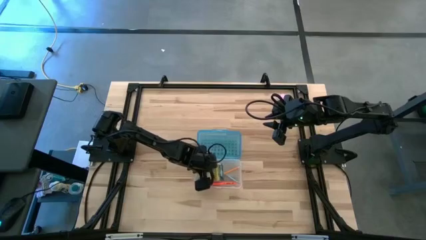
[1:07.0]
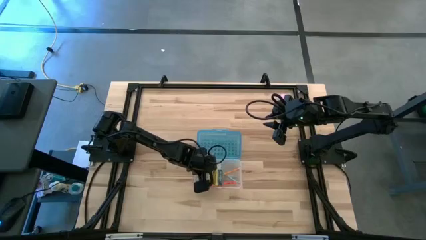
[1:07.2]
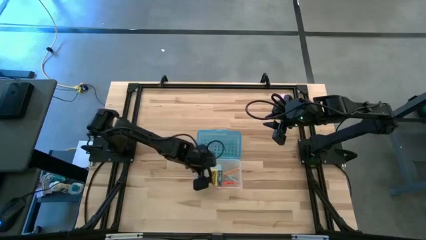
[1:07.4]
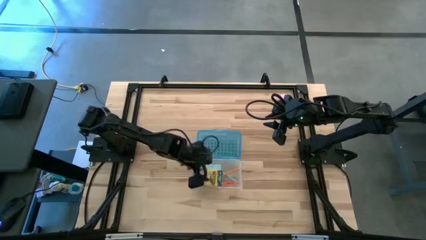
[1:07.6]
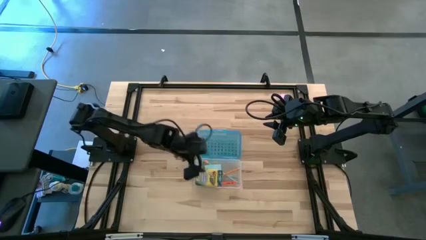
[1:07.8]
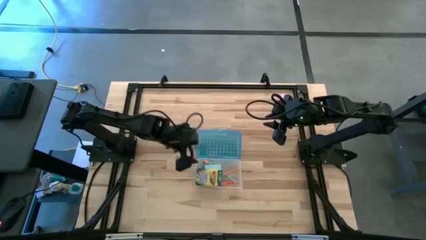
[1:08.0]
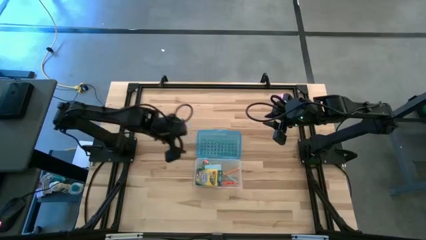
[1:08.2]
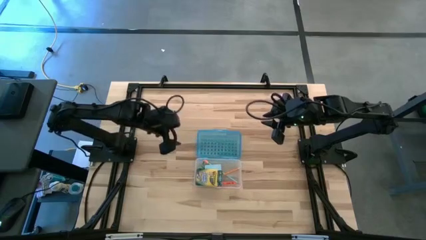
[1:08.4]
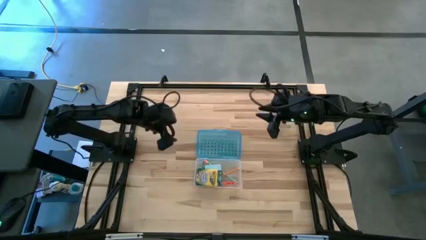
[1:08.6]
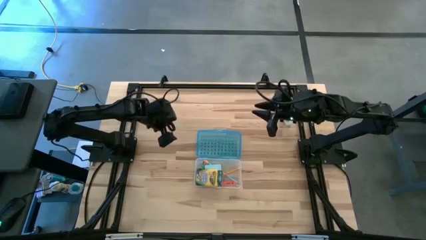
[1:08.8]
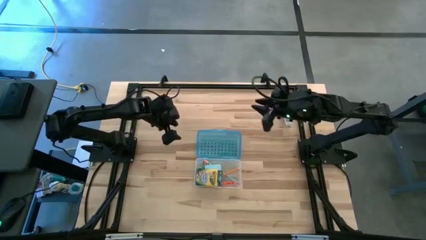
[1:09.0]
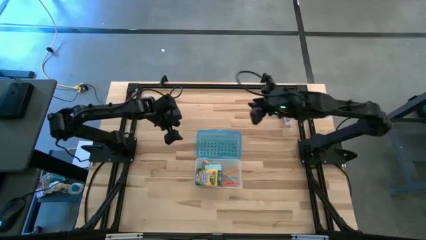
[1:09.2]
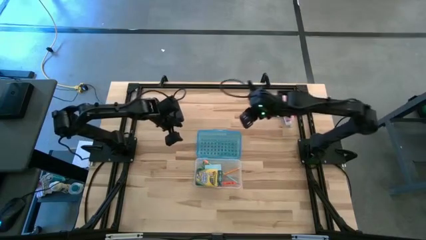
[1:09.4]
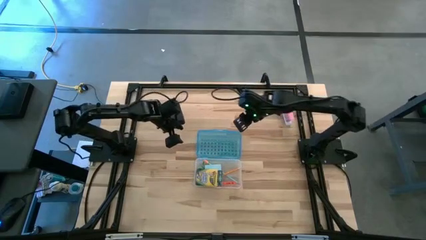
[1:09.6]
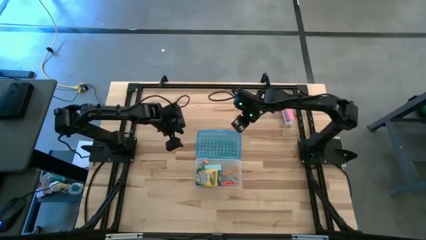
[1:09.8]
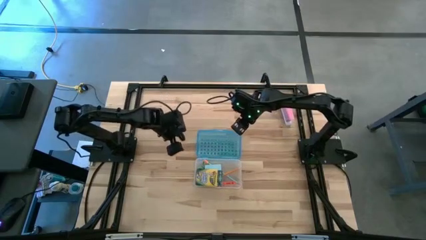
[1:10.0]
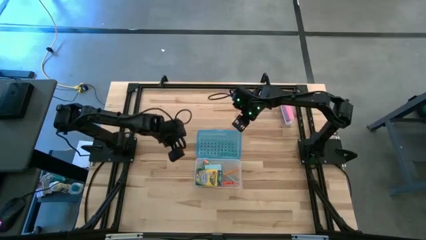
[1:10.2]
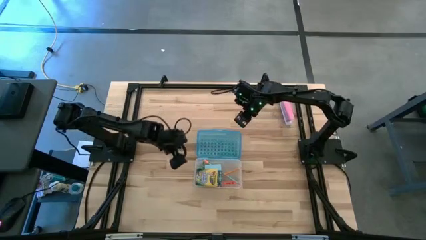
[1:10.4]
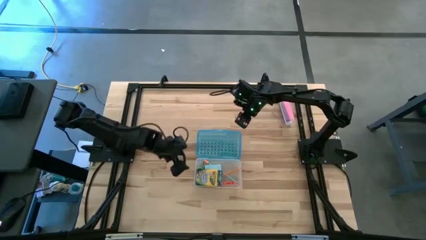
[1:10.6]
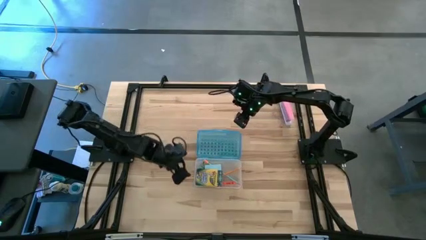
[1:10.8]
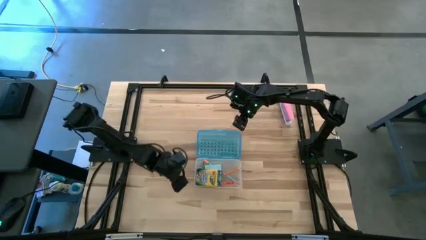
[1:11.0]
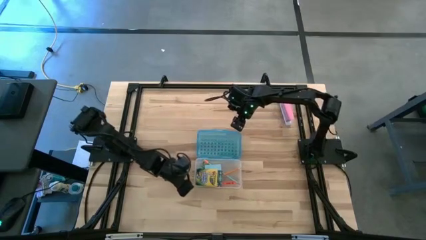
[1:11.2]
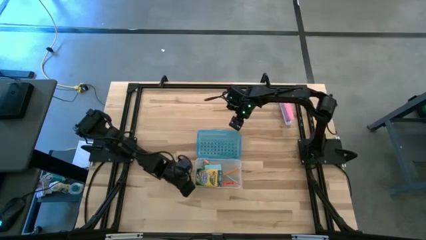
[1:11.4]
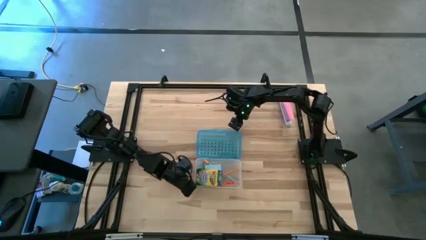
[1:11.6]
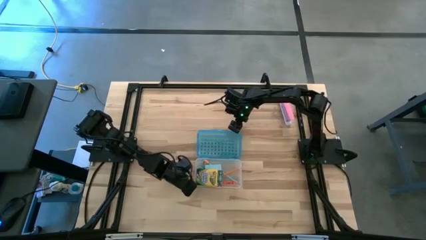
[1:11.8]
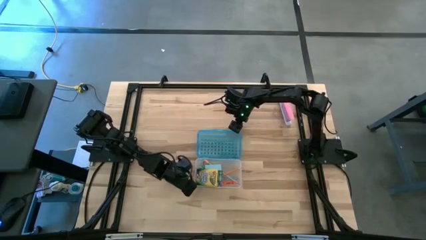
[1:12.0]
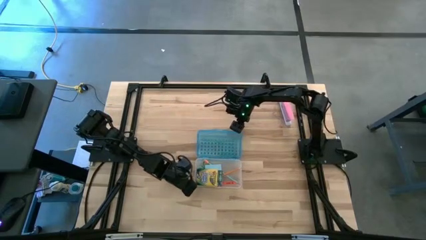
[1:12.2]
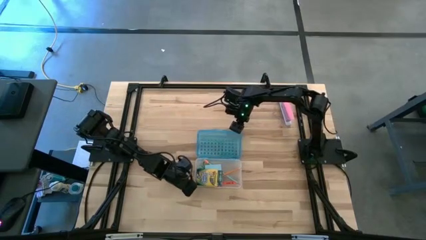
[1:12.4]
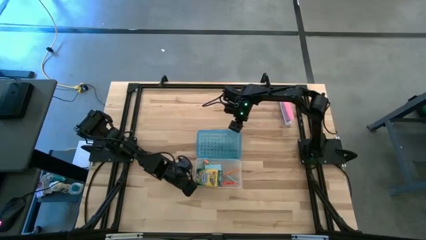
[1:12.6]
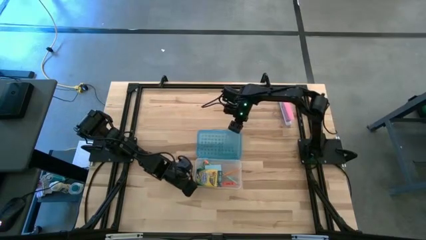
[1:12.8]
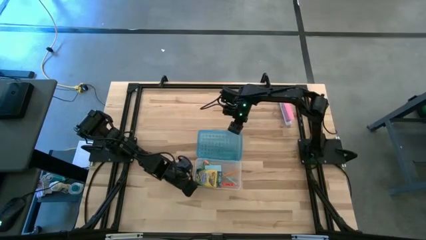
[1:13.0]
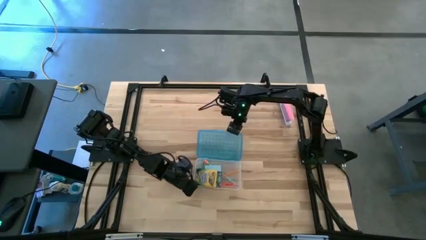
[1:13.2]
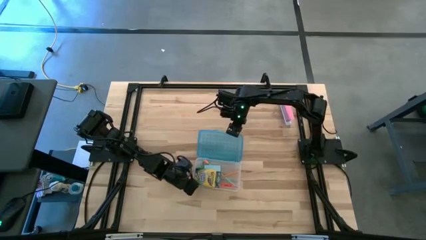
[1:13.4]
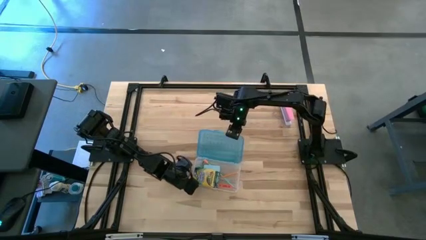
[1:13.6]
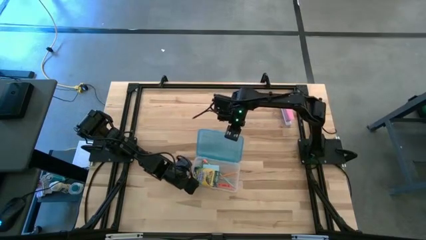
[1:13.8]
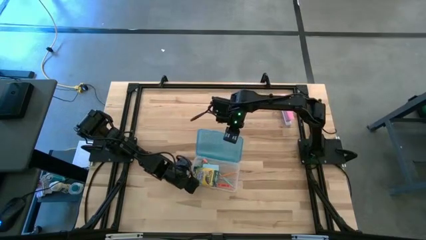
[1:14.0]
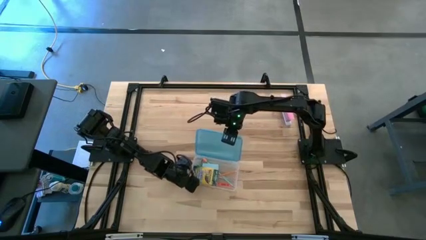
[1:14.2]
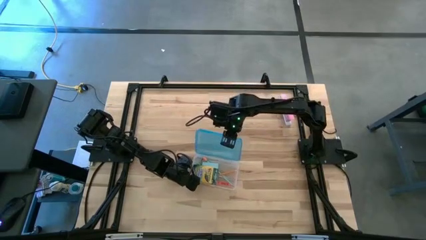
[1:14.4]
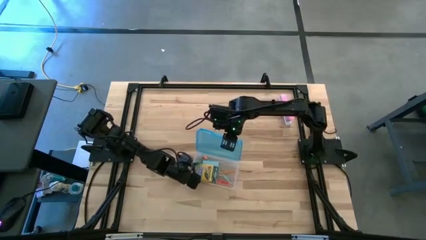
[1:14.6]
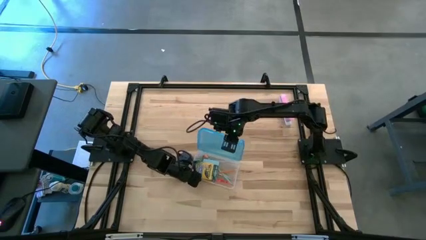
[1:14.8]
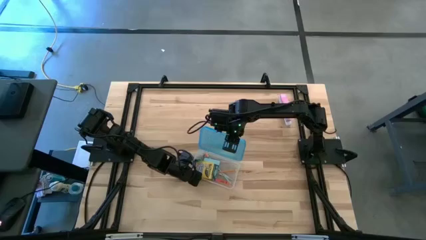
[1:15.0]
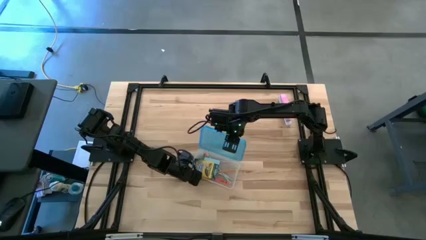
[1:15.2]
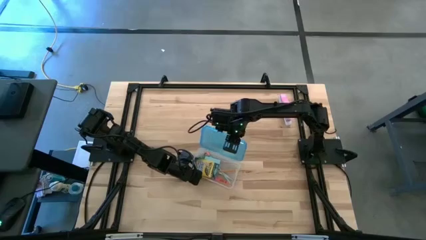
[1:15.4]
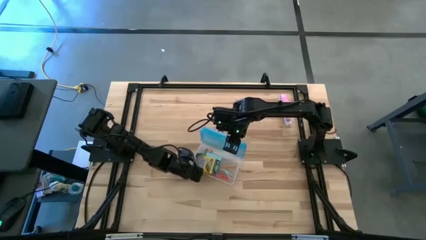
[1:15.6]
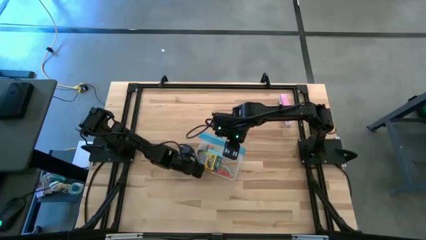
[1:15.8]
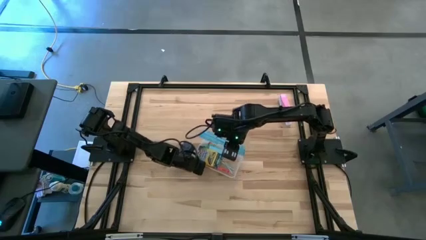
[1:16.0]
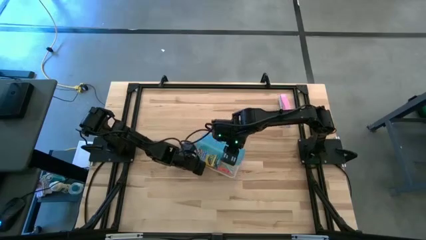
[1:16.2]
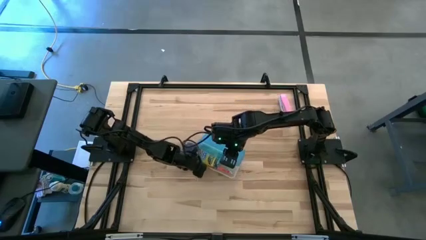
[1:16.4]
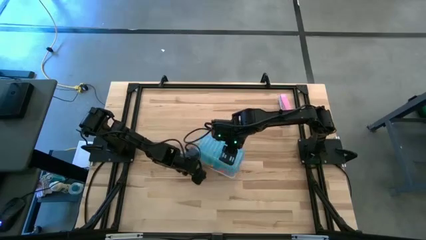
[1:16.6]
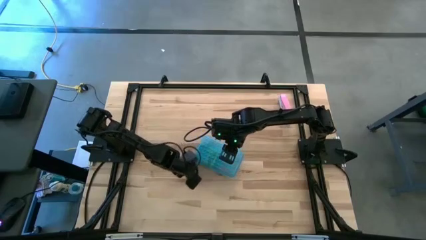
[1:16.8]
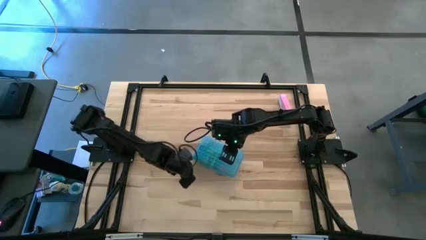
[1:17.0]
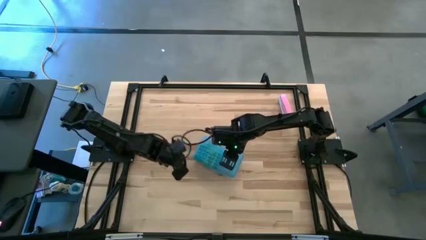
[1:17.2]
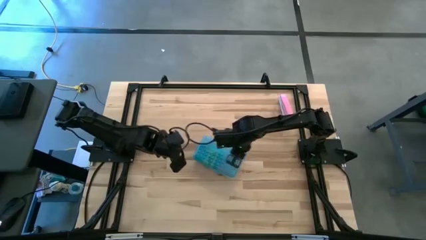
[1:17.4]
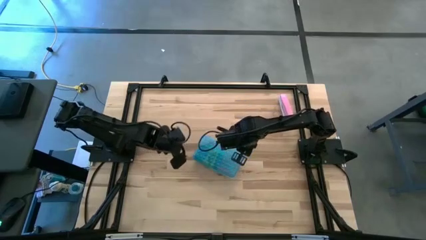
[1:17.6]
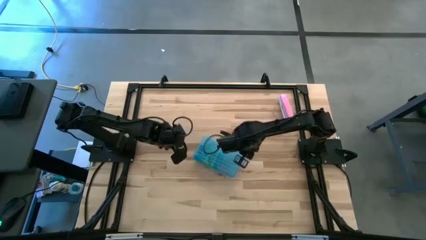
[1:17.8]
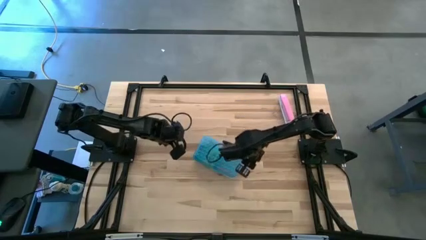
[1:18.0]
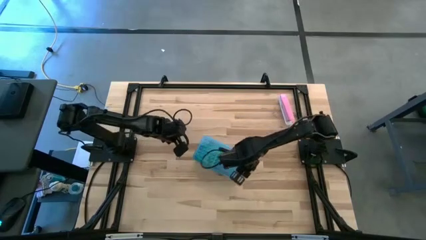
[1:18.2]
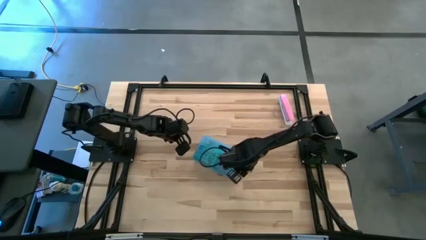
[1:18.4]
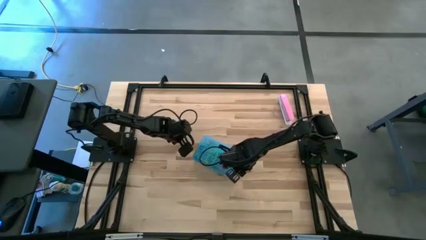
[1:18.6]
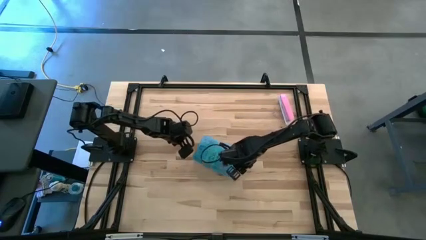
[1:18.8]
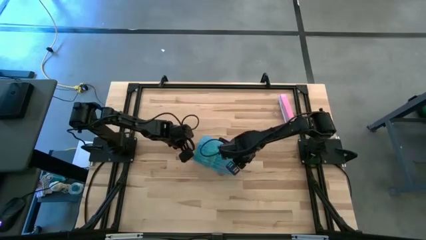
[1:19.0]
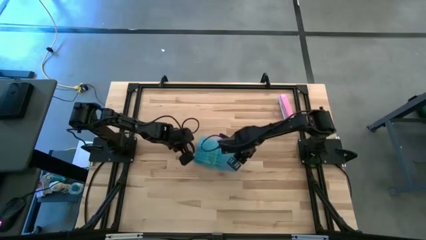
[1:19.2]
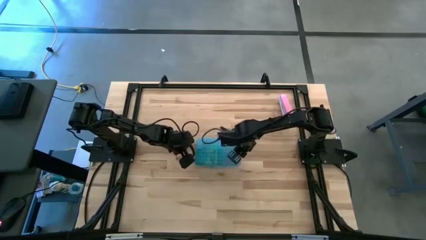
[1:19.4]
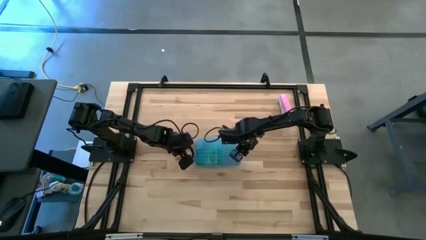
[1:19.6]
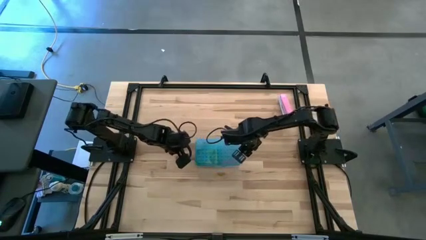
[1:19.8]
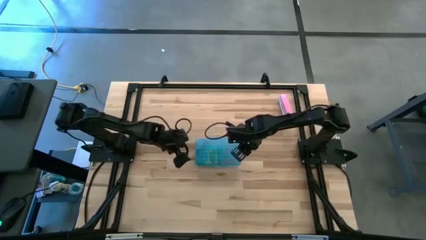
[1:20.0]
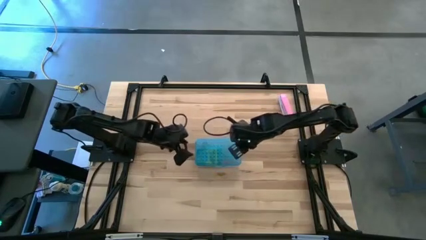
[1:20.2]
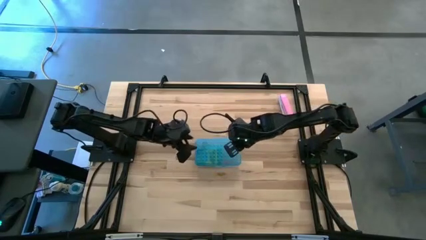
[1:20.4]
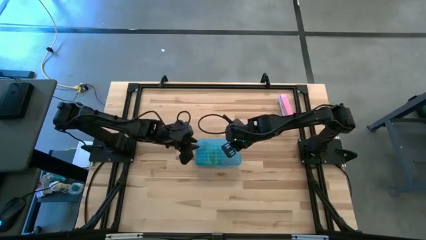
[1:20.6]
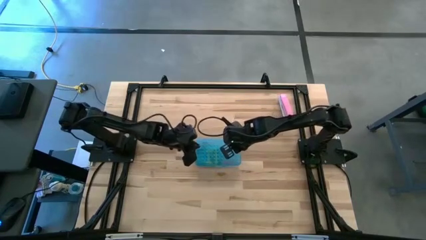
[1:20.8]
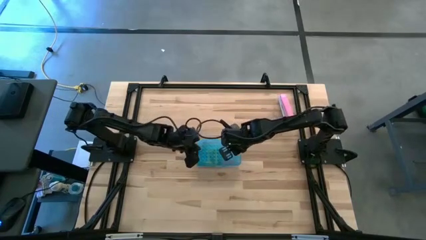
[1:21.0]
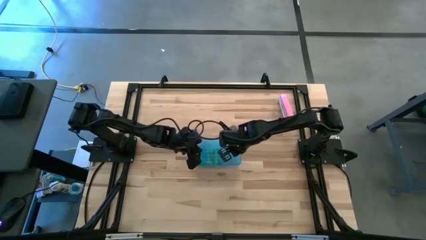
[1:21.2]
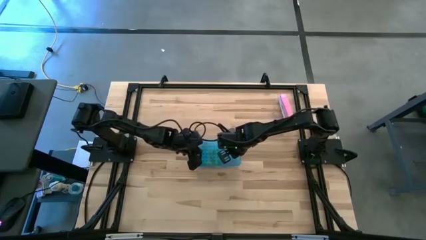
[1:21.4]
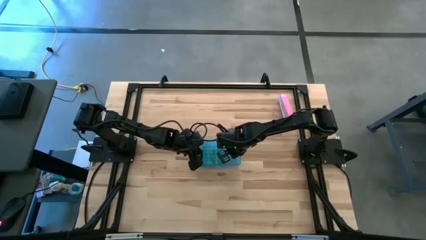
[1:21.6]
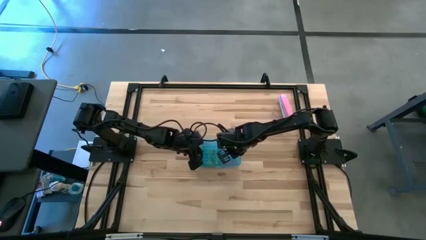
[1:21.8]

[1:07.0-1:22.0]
Task: Pack school essentials
Close the blue supply box

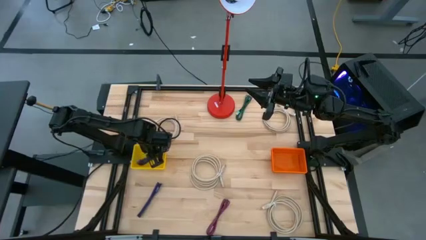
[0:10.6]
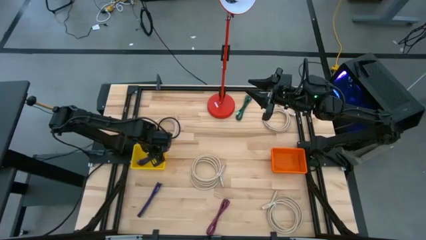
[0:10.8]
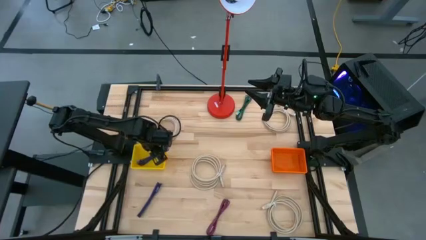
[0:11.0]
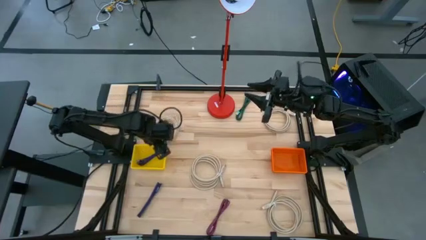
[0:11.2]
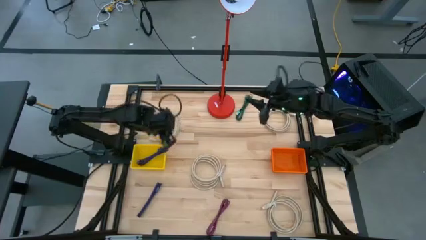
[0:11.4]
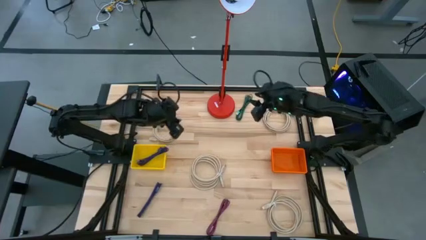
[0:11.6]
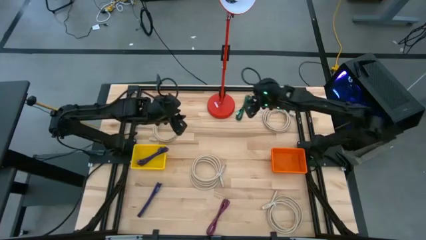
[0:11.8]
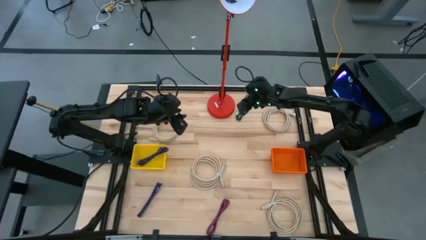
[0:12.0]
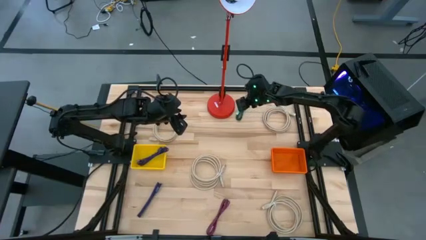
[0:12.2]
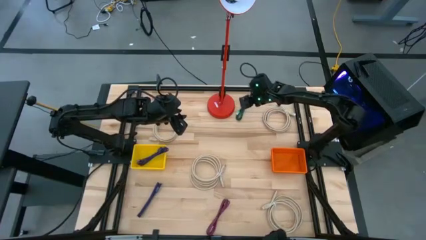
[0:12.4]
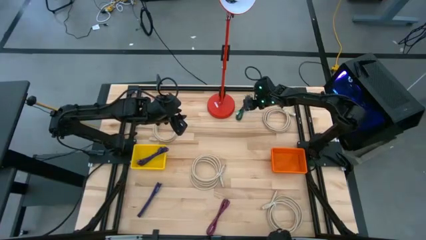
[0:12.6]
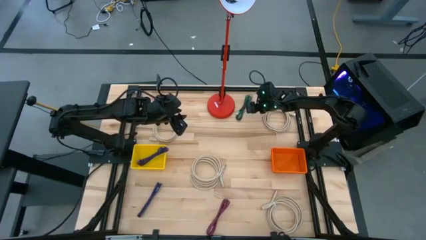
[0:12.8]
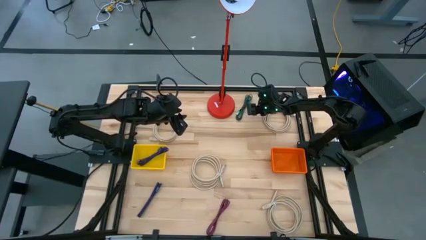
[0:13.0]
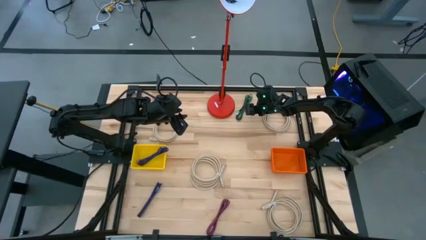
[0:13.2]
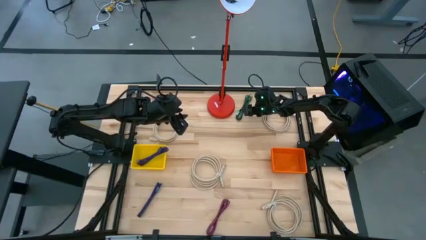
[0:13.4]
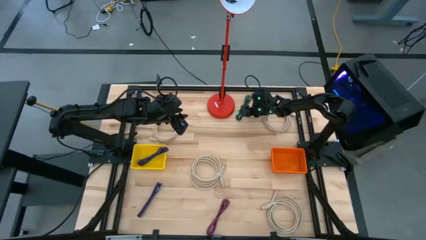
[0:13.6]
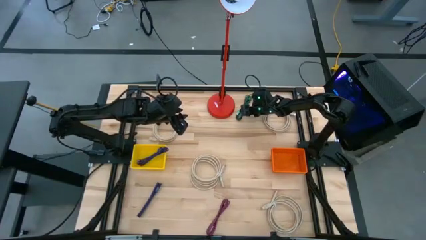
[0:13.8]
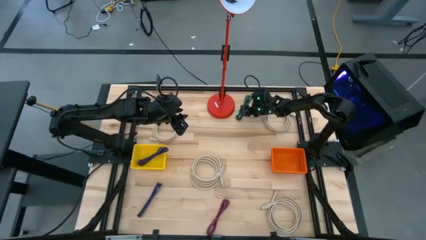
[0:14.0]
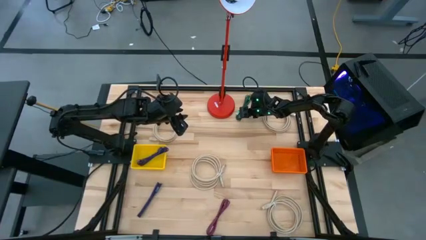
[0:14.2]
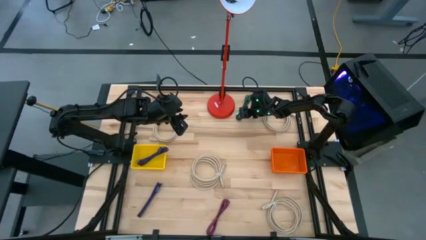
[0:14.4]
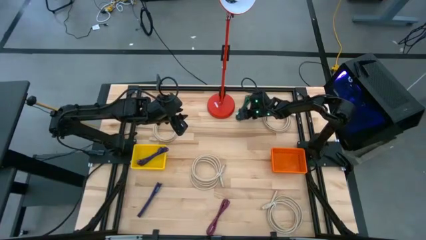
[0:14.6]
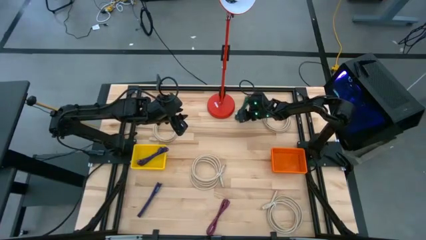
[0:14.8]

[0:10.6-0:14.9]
Task: Pick & Place USB Port
Put the black and green charger cable into the yellow bin
